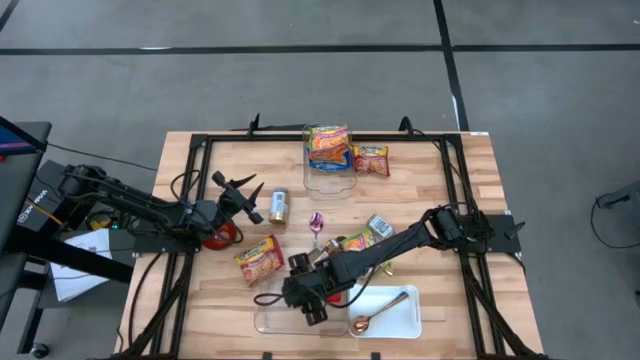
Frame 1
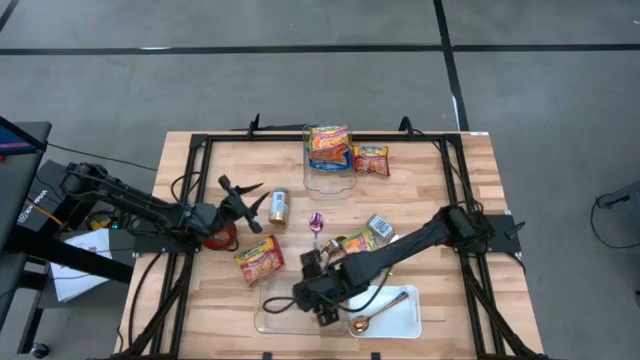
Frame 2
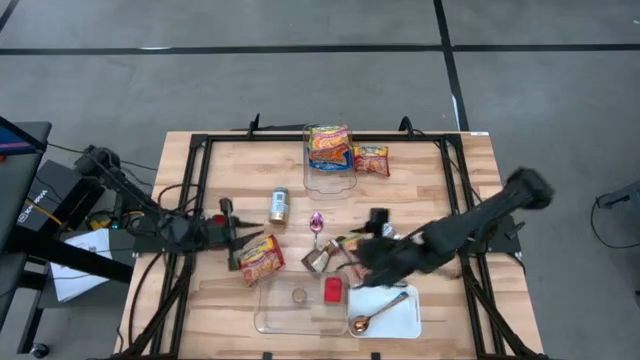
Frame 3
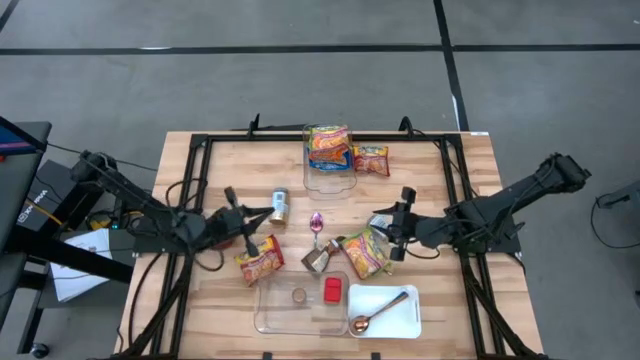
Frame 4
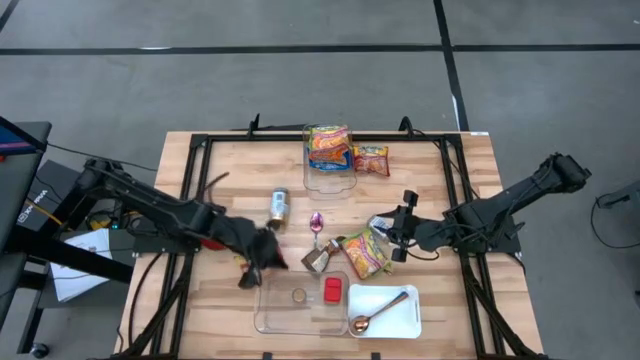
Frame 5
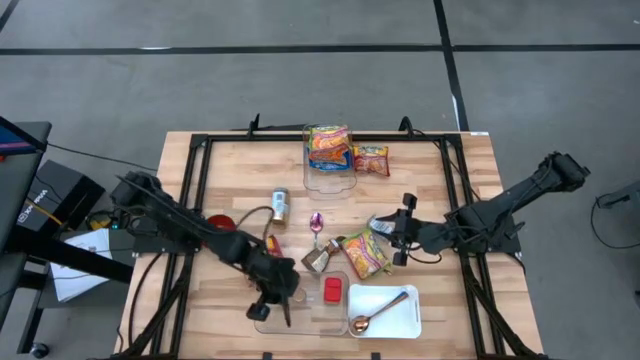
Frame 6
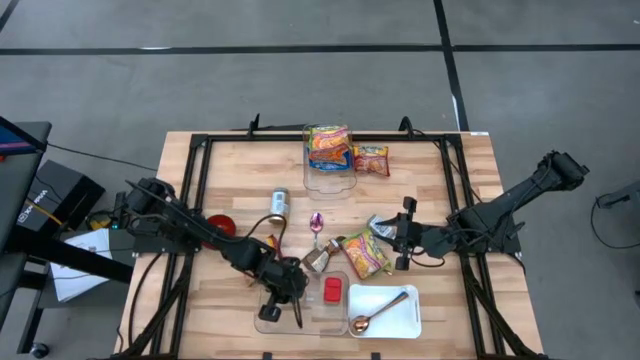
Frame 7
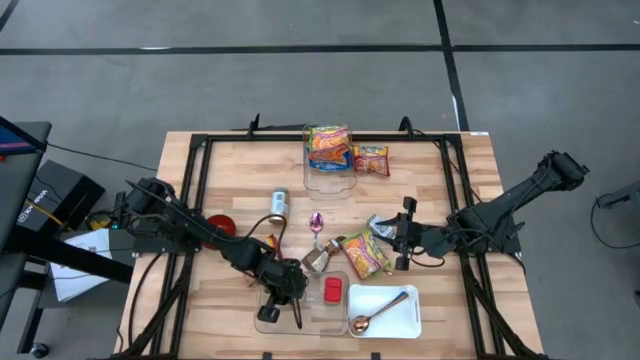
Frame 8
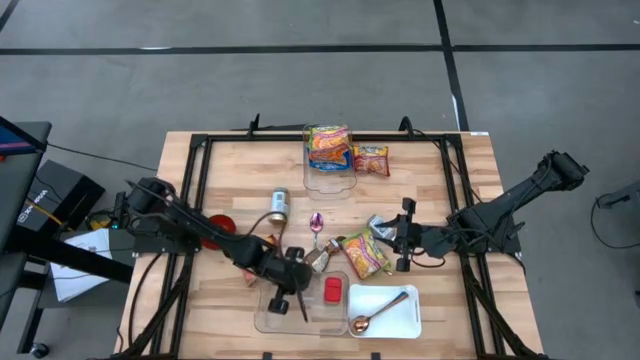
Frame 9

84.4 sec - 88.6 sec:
Task: Pick & Place Food Item
Adjust the brown seasoning in the bottom transparent bin

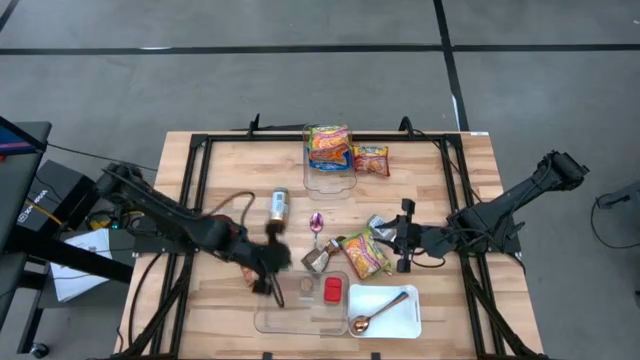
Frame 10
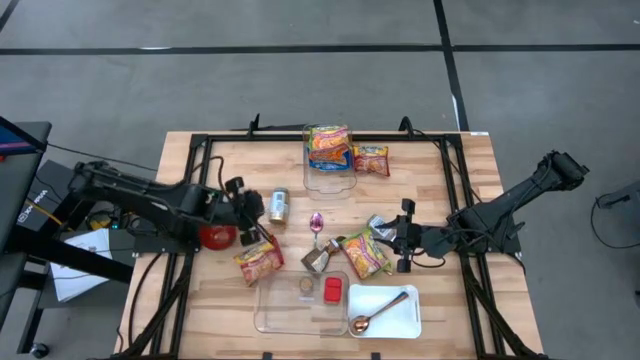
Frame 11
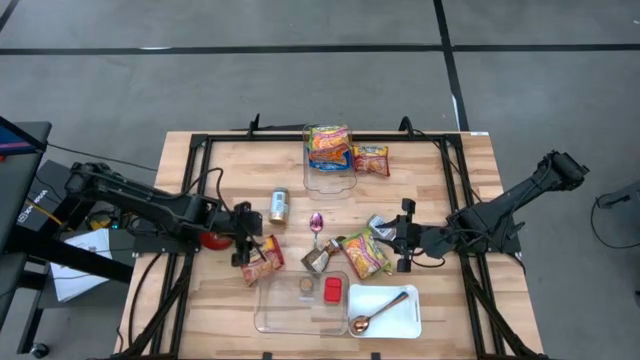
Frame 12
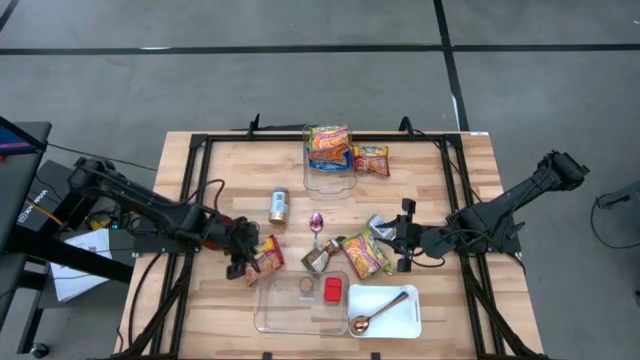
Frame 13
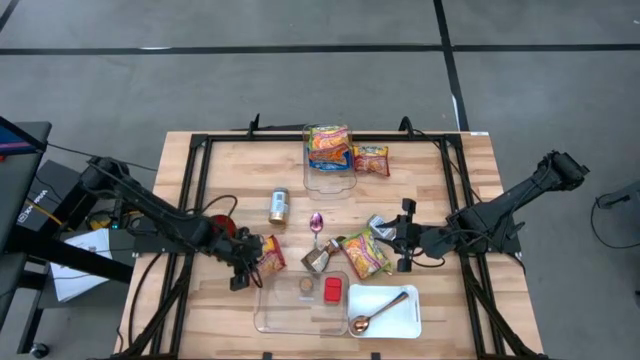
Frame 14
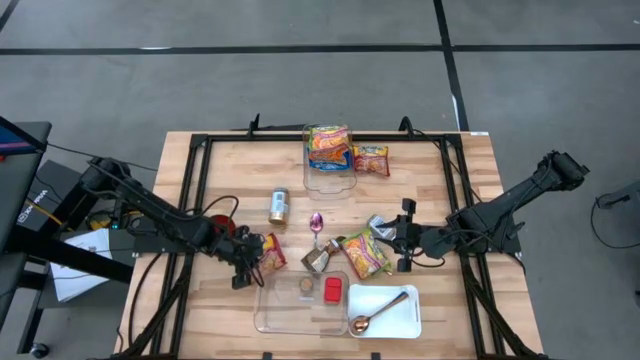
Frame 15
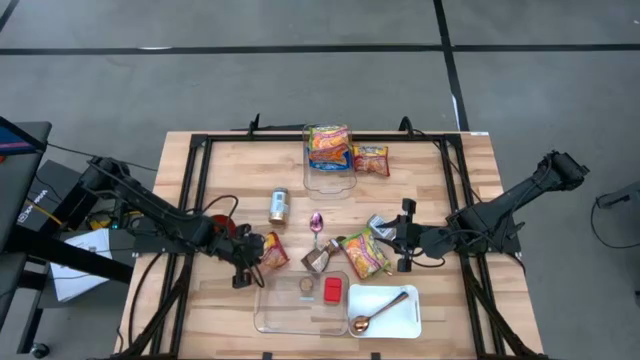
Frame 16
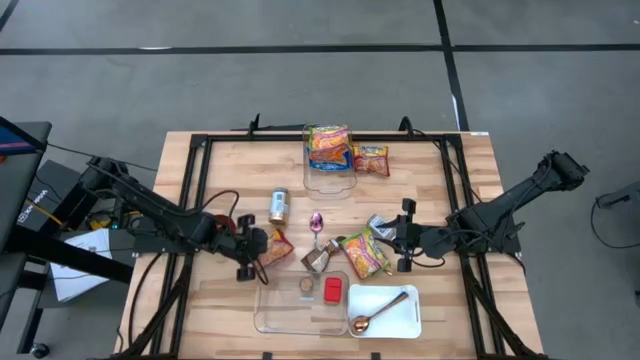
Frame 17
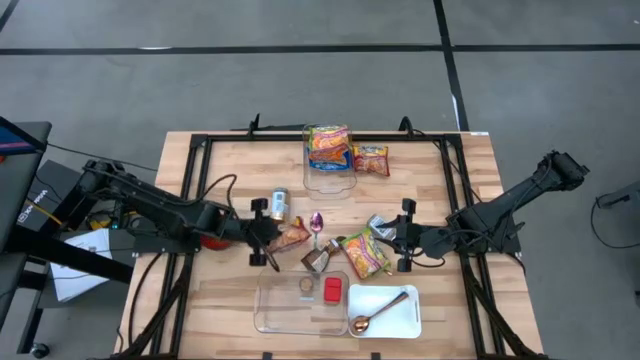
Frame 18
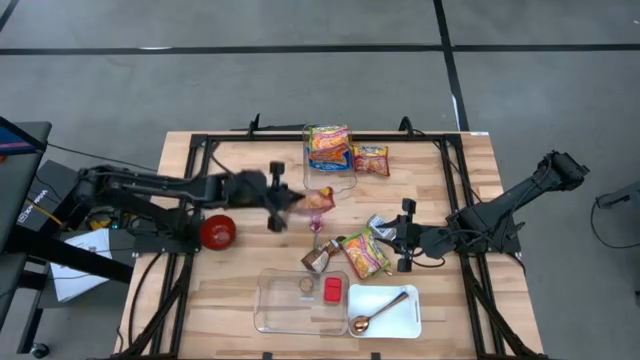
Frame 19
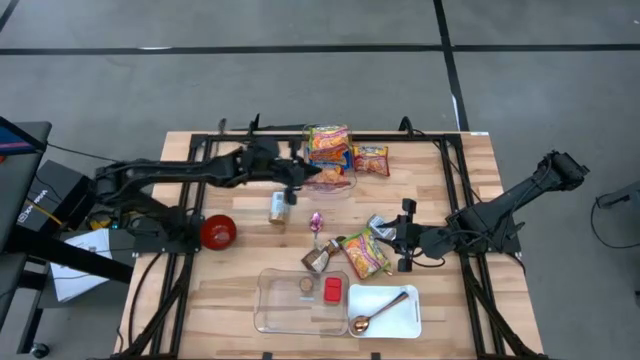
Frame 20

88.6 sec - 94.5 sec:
Put the bottom red noodle pack into the top transparent bin

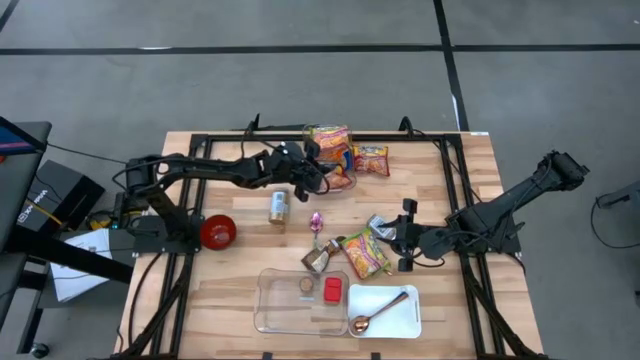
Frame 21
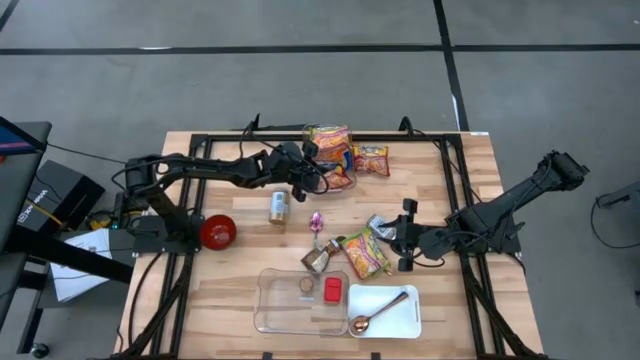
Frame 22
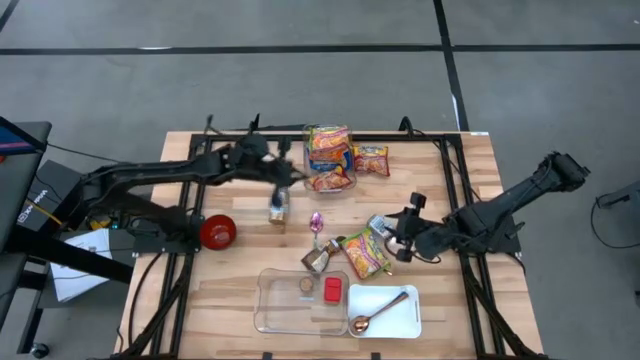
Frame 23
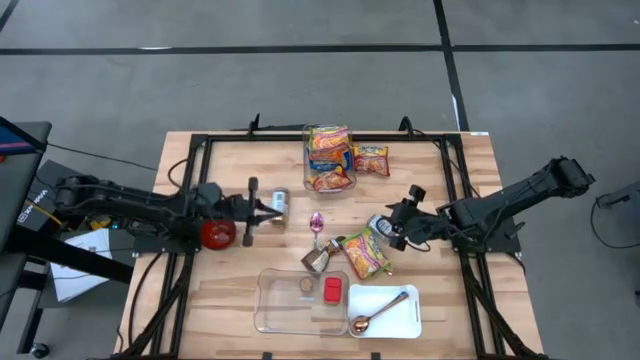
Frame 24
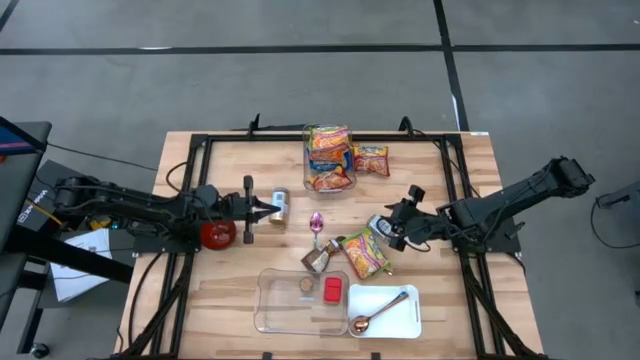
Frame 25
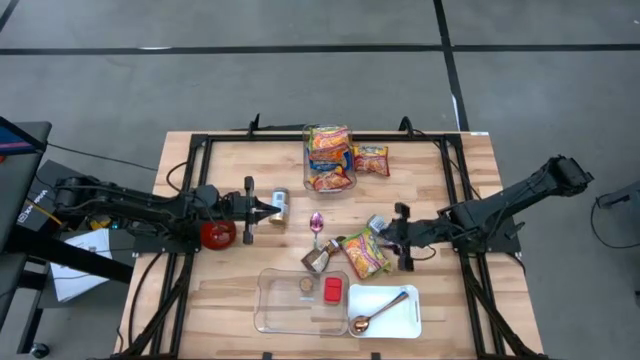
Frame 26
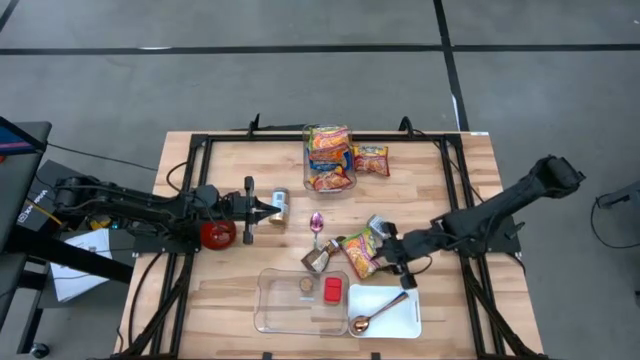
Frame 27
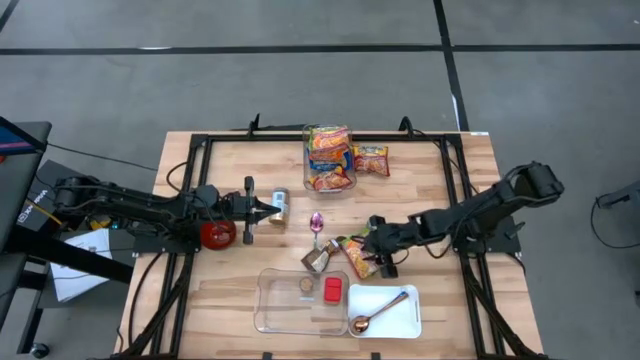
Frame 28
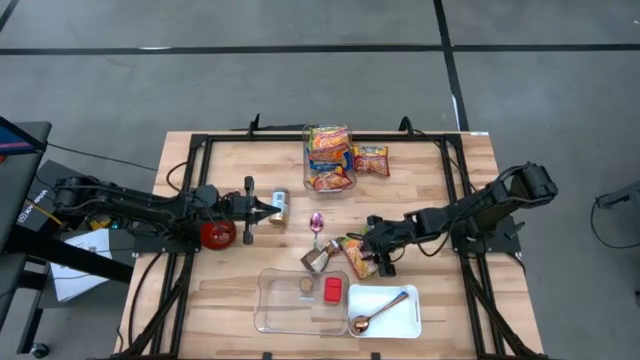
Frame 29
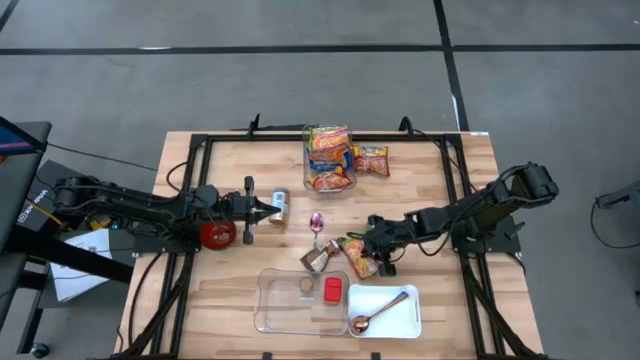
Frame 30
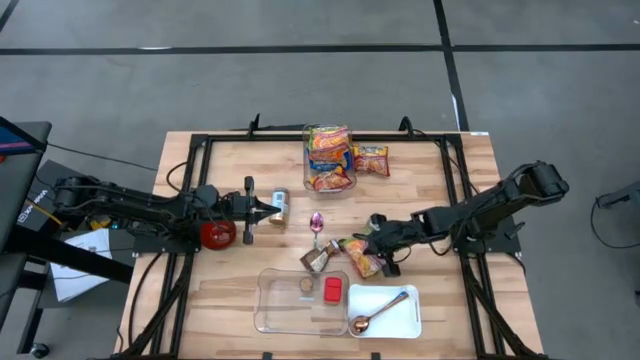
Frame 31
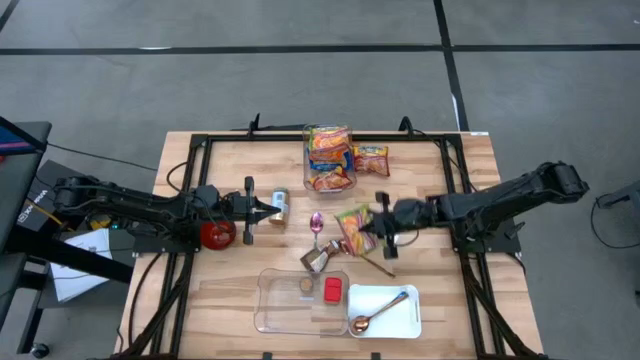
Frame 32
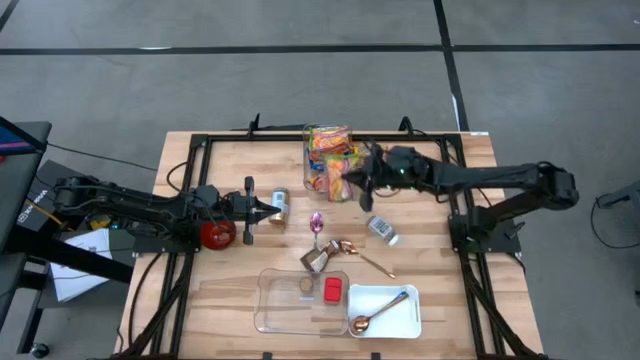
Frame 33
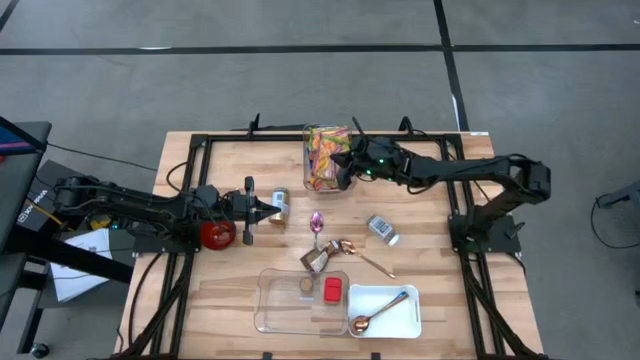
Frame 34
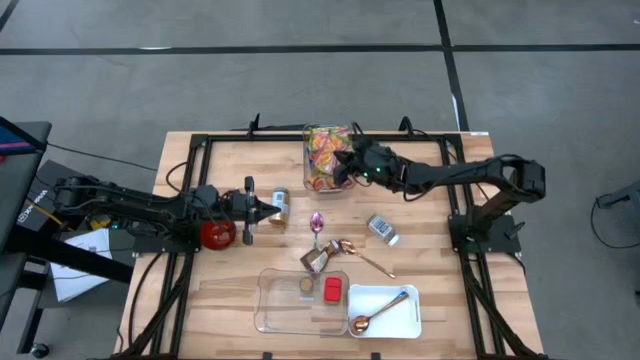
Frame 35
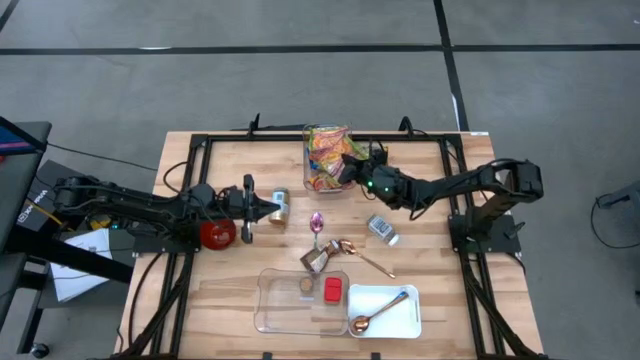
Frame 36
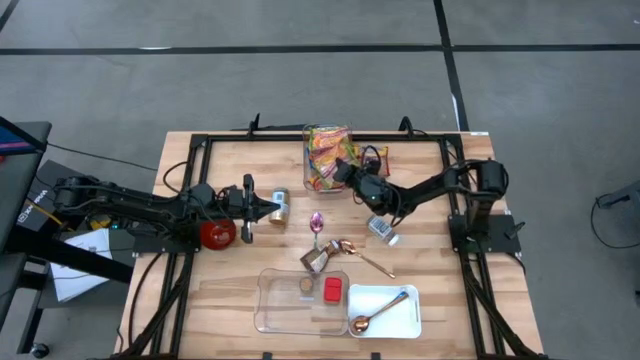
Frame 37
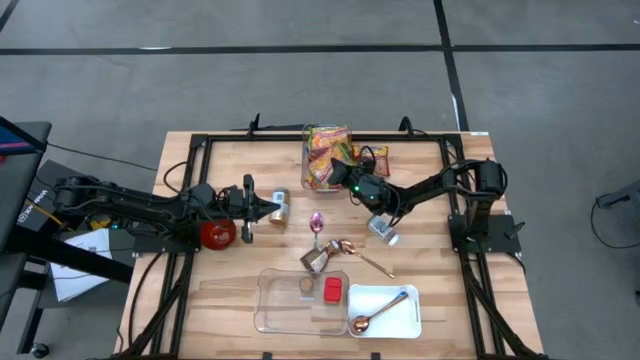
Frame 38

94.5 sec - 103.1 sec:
Put the green noodle pack into the top transparent bin

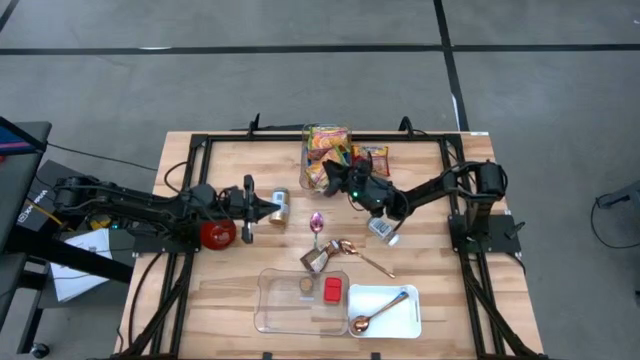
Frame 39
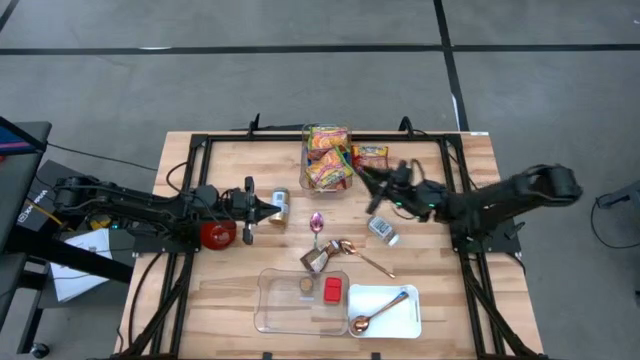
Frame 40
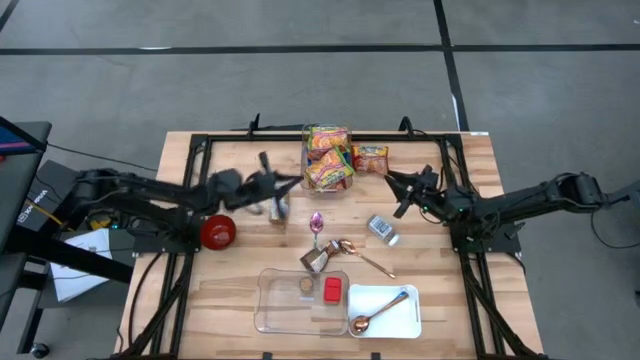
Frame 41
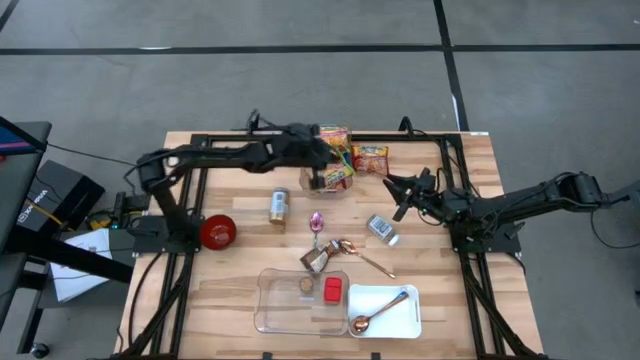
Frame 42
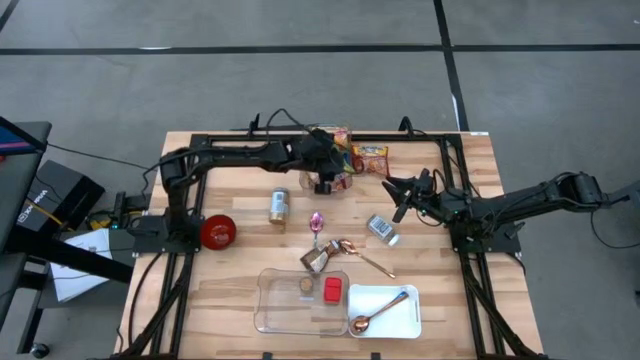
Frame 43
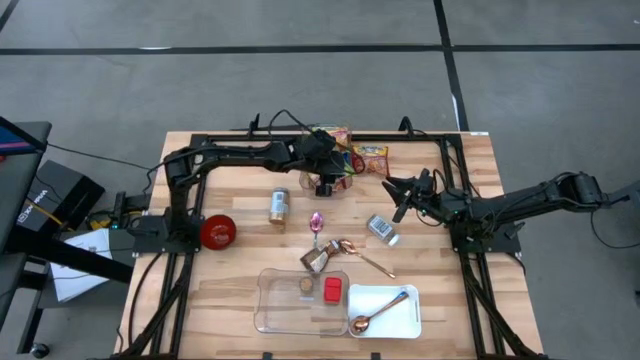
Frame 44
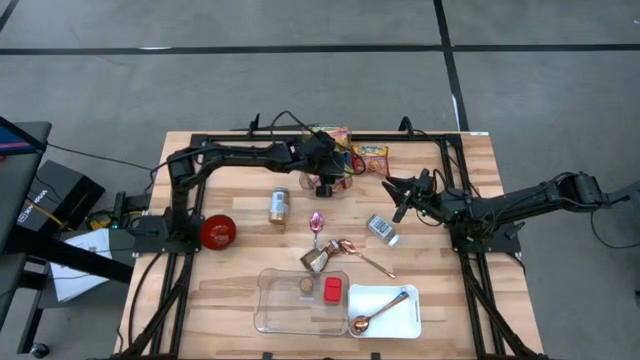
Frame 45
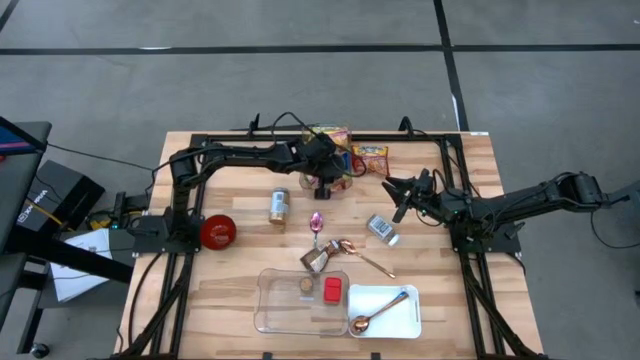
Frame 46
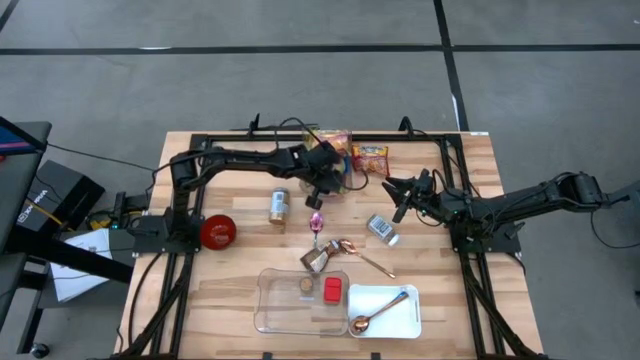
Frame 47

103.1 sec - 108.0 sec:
Adjust the green noodle pack in the top transparent bin
